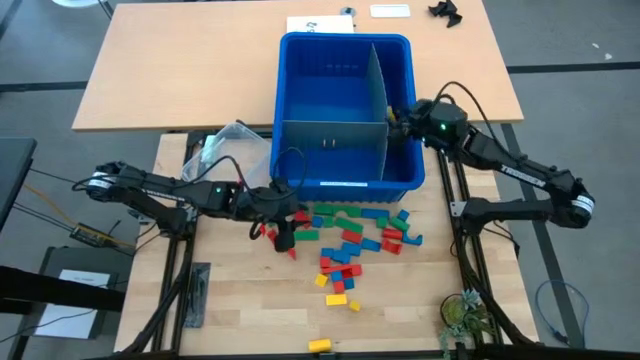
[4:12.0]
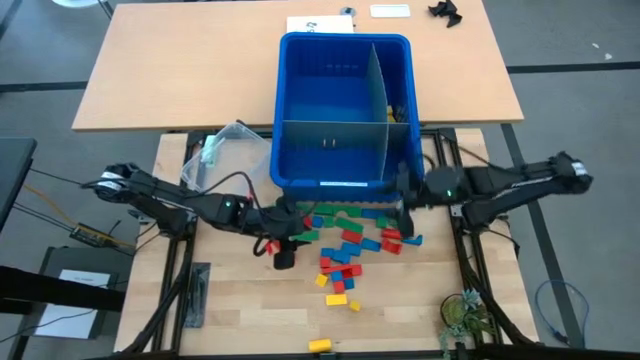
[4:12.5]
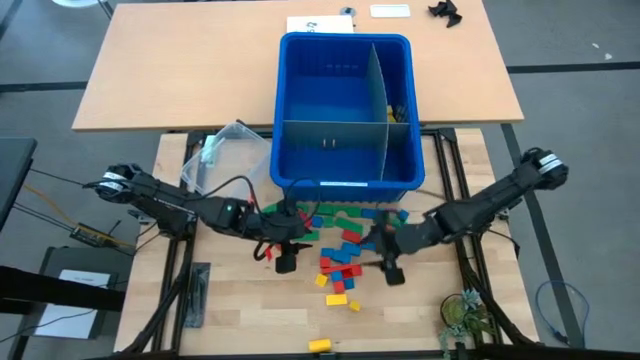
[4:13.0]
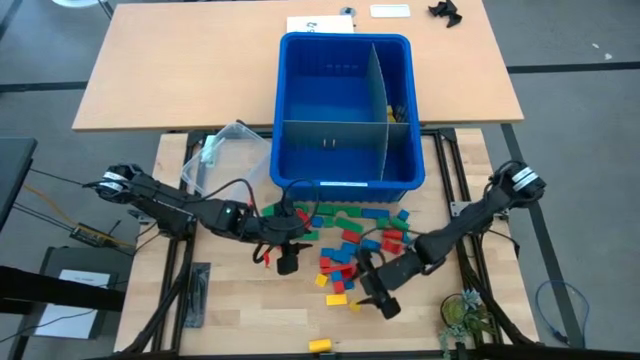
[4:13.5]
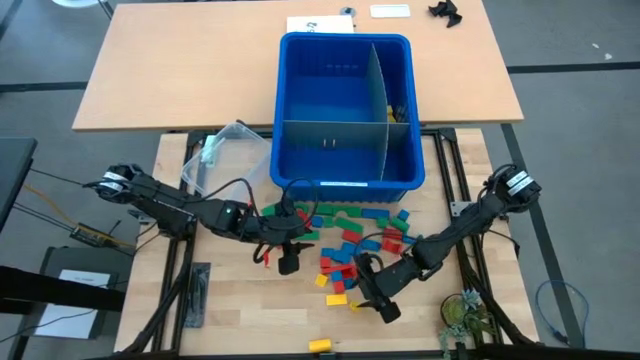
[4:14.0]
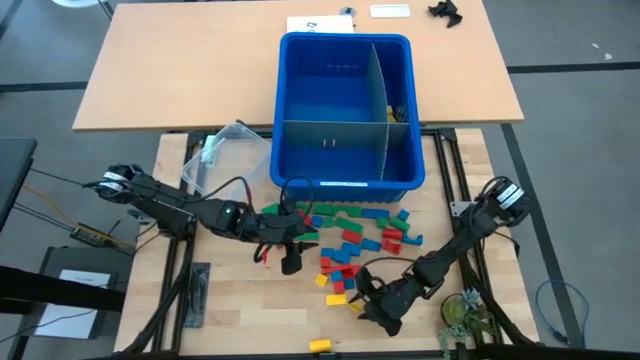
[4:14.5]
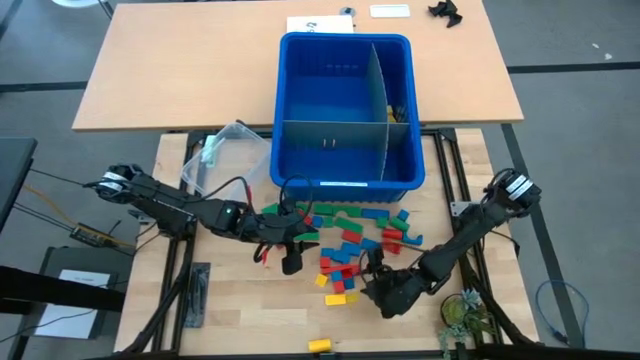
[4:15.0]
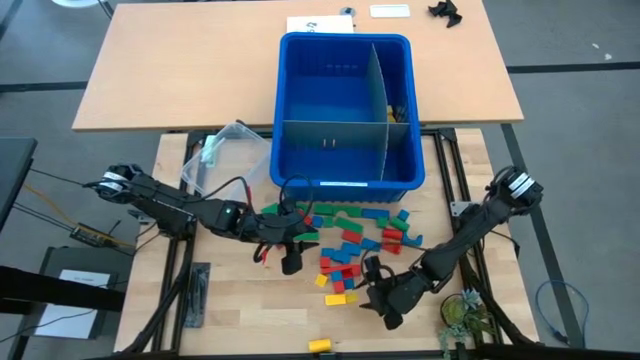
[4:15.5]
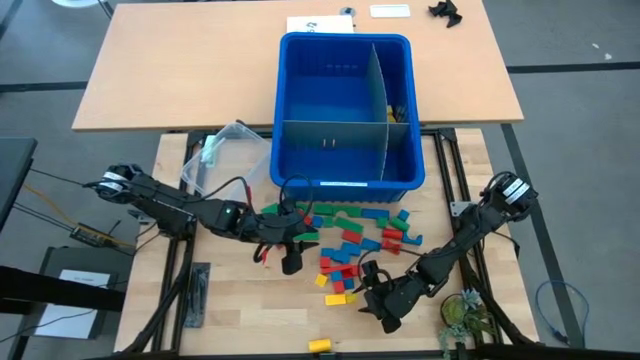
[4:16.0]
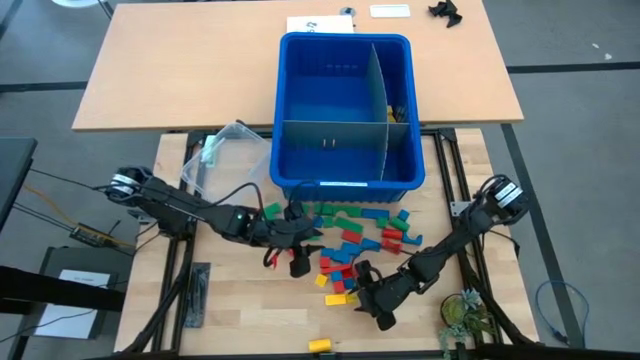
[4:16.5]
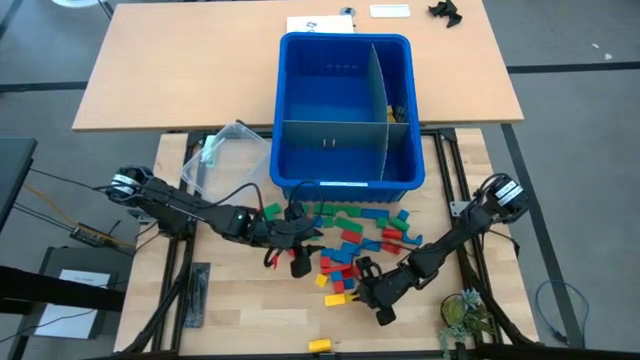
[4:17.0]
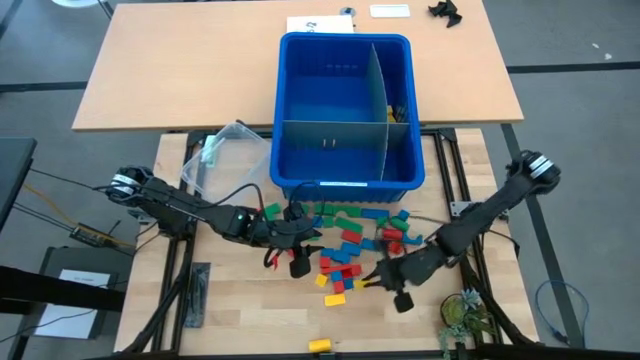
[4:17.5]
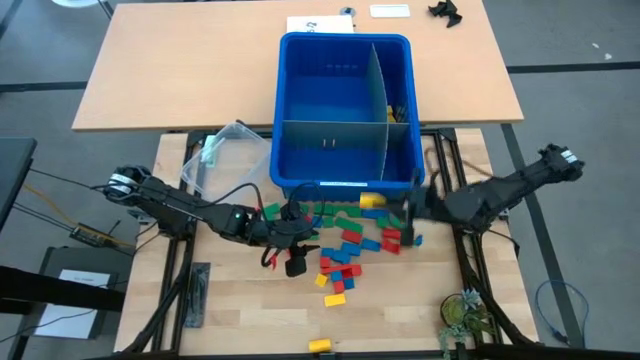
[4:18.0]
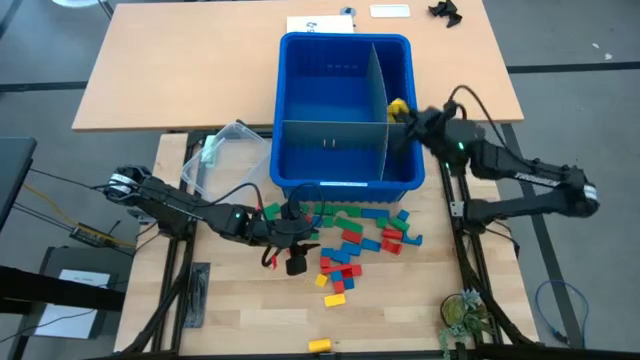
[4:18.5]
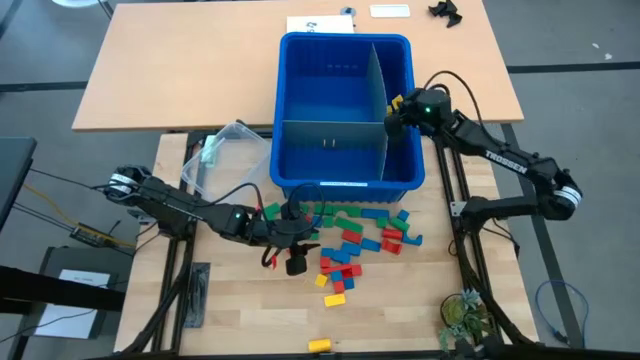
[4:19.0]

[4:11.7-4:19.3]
Task: Sort blocks
Put the yellow block into the blue bin

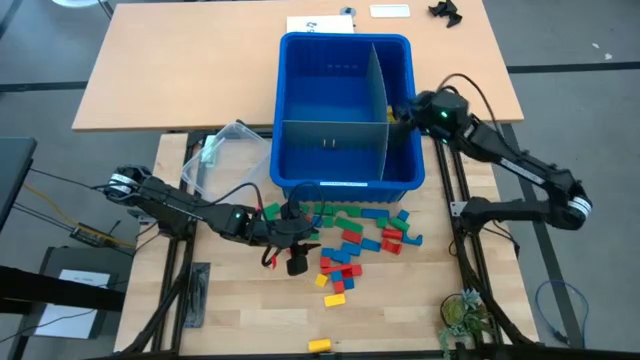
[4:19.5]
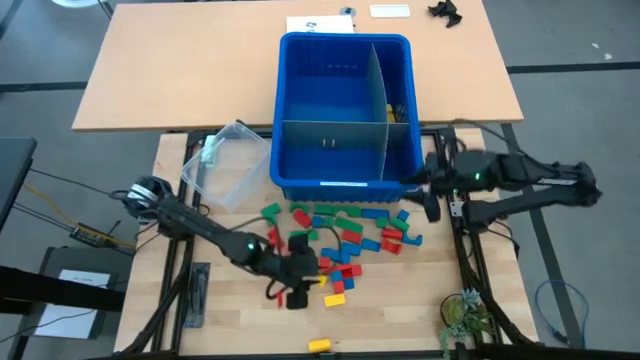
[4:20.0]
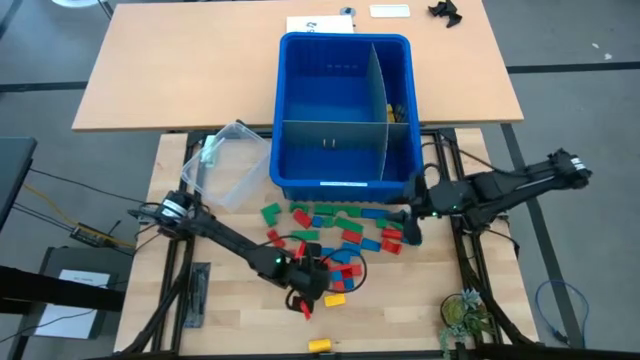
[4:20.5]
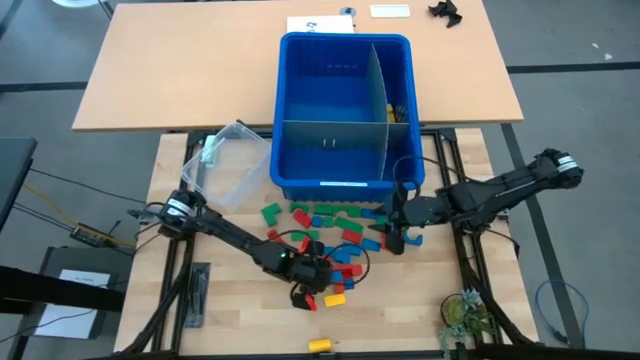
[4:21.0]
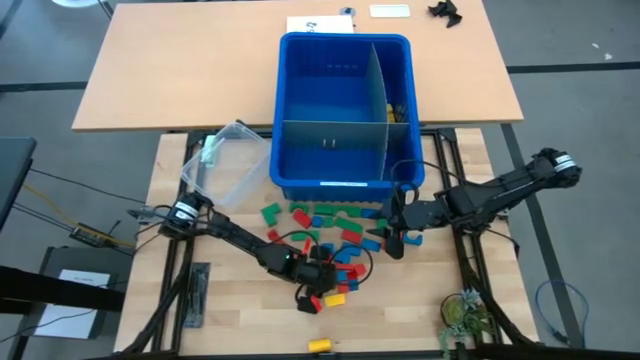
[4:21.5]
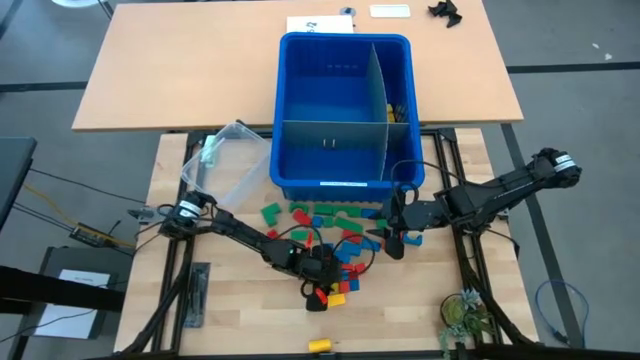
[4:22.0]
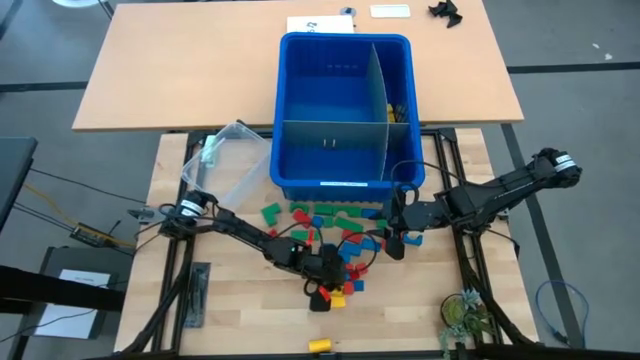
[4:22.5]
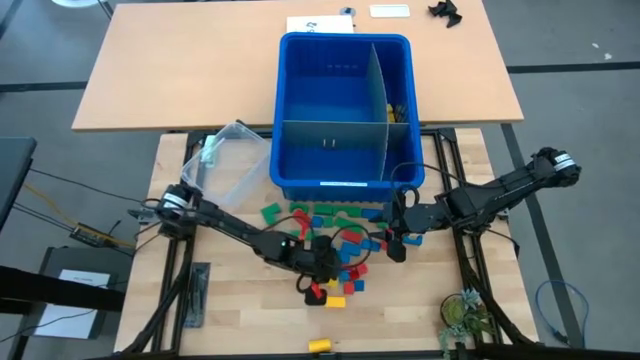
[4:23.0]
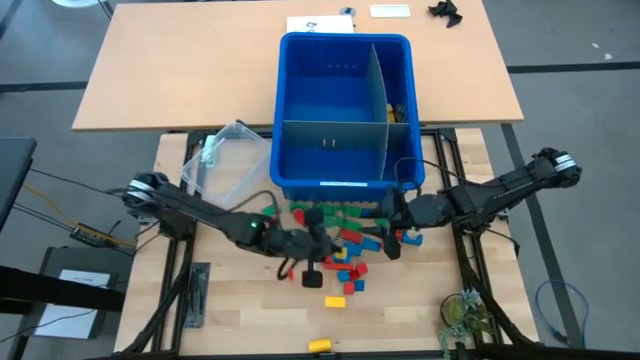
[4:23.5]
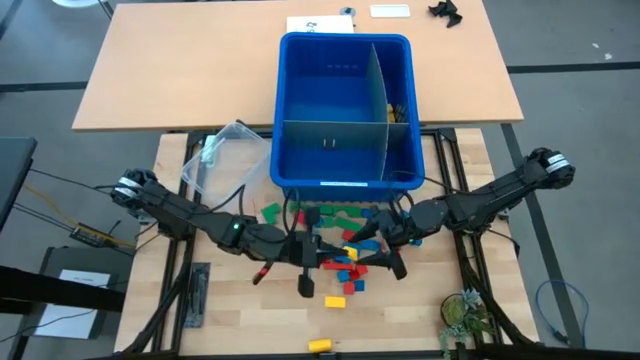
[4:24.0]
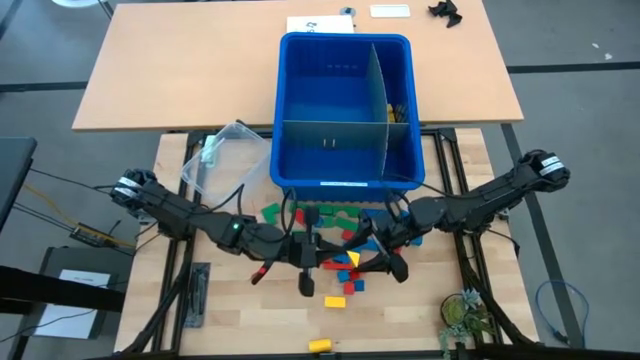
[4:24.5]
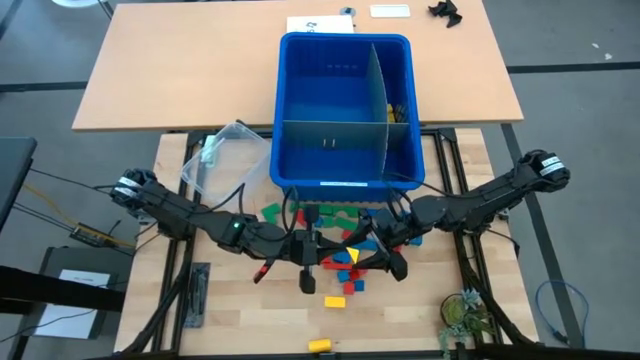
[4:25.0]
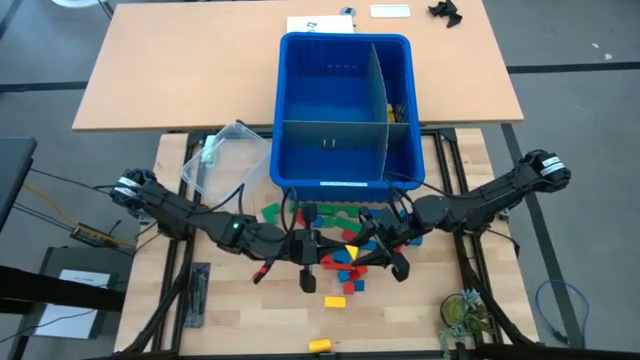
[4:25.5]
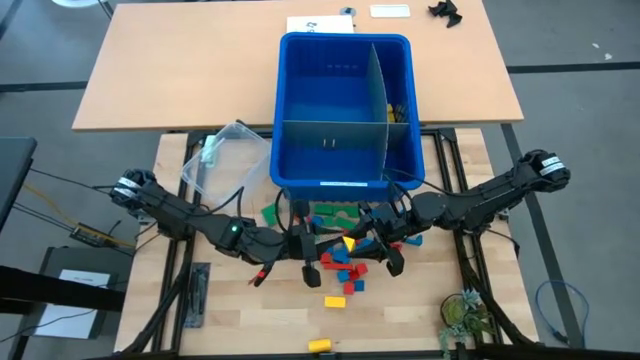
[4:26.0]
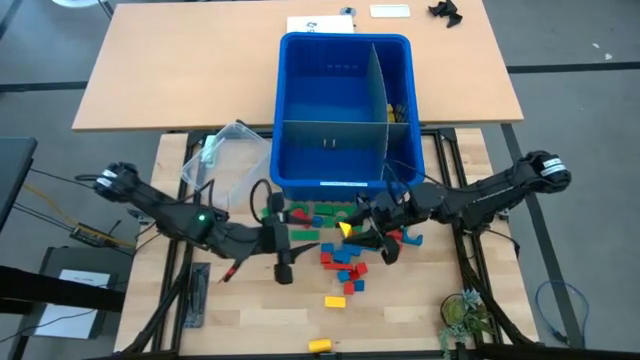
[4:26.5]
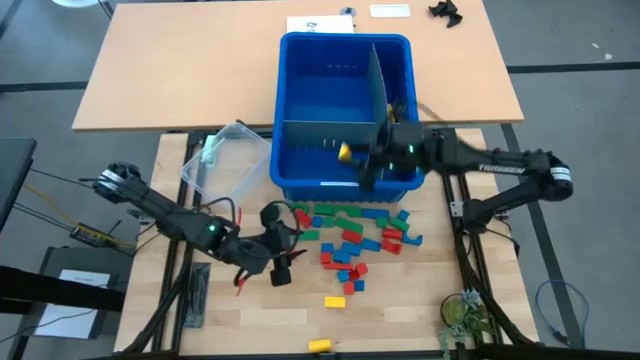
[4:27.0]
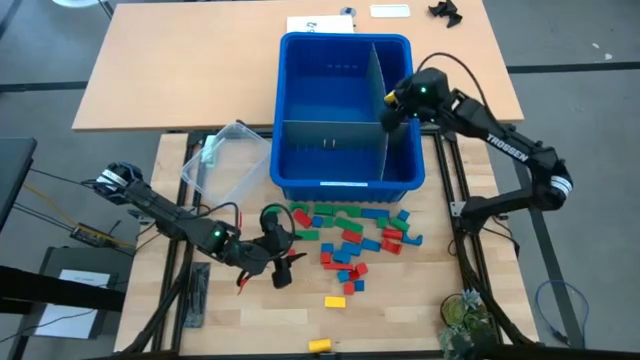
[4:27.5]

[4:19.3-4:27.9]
Put the yellow block into the blue bin

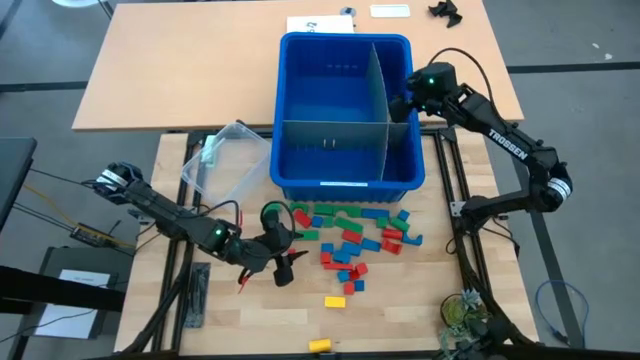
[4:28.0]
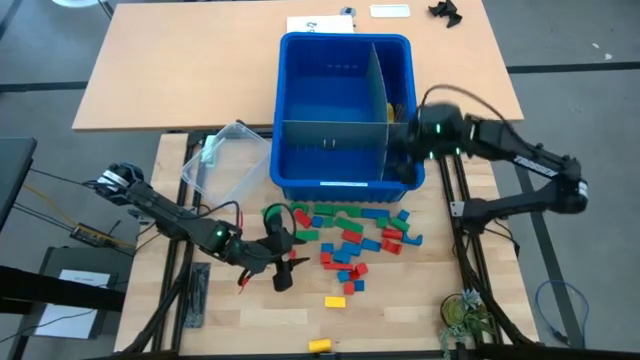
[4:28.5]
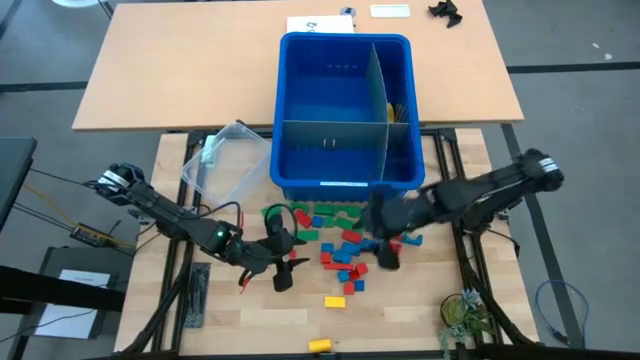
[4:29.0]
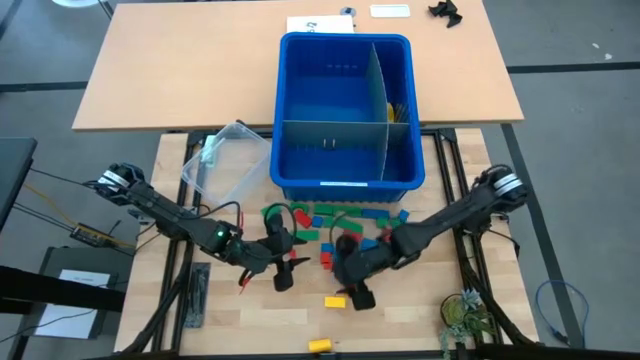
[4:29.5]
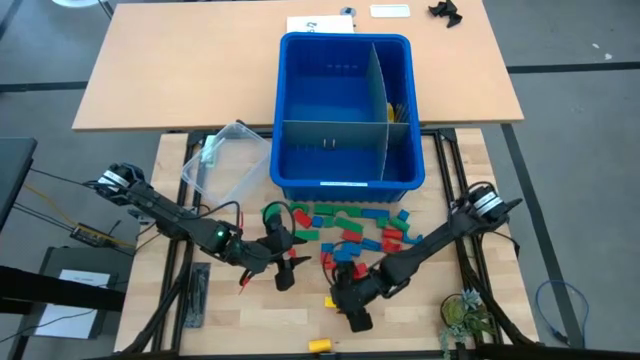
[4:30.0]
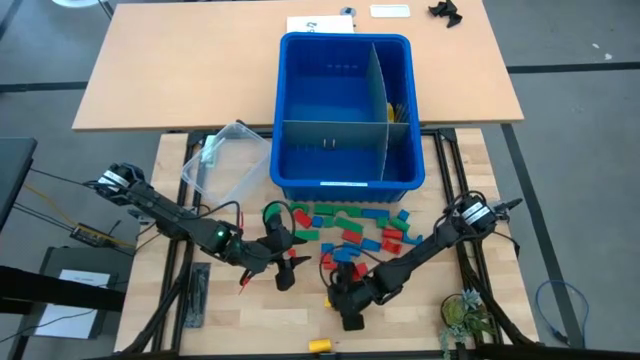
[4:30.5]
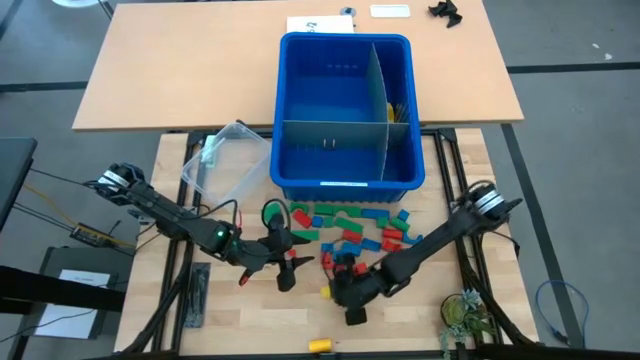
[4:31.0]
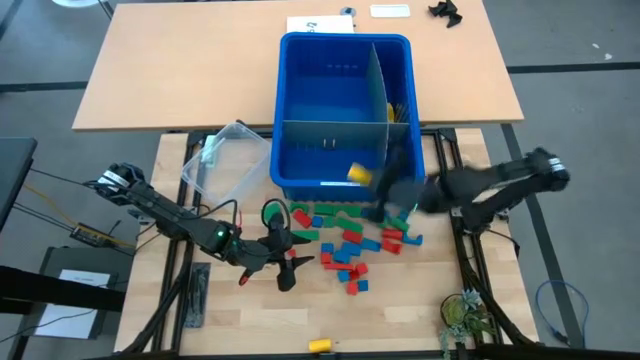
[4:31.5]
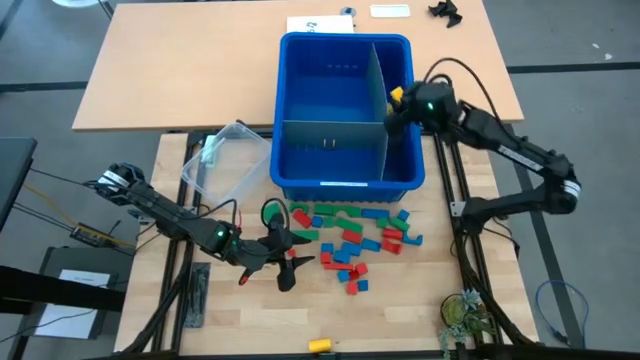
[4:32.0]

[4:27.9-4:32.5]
Put the yellow block into the blue bin
